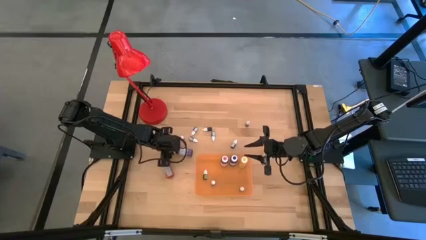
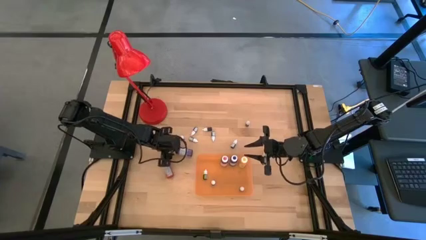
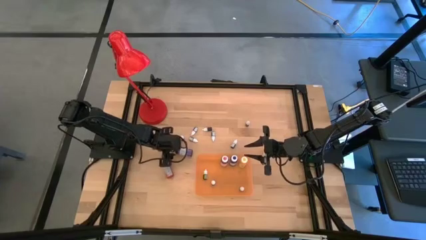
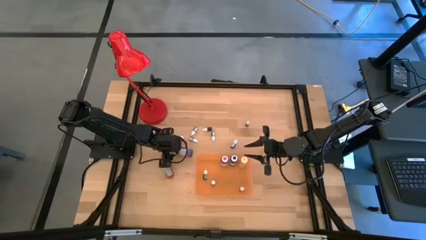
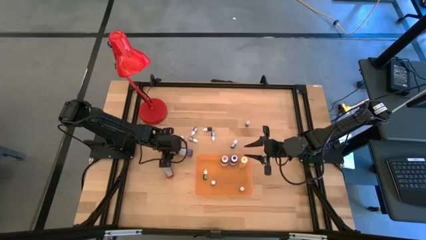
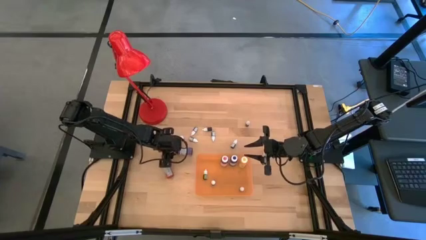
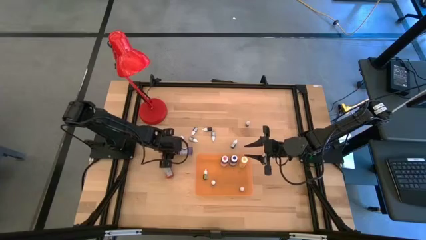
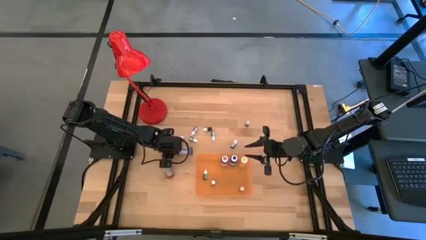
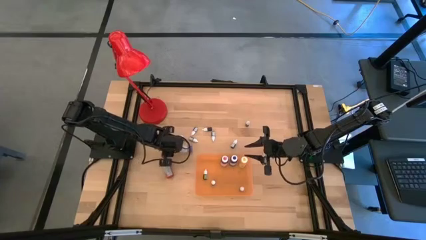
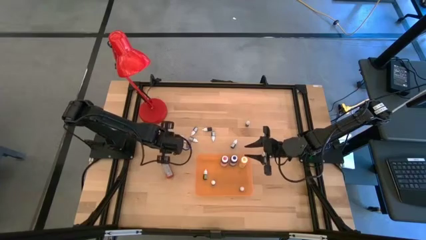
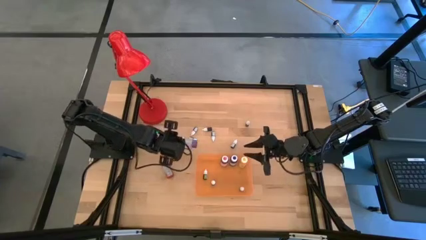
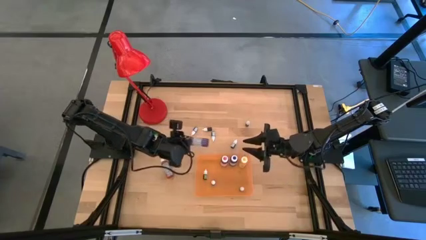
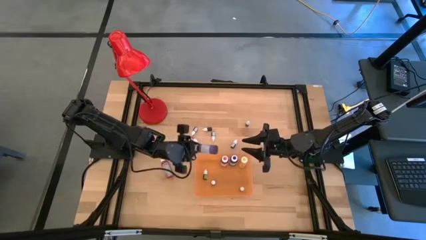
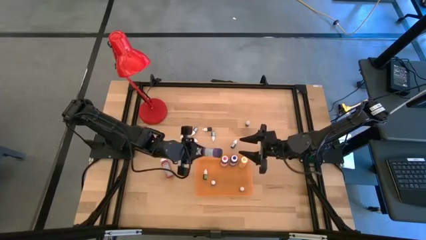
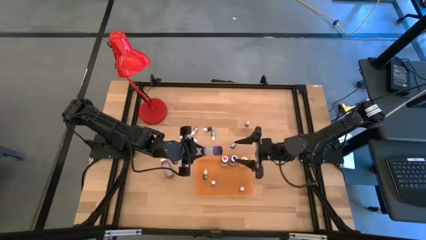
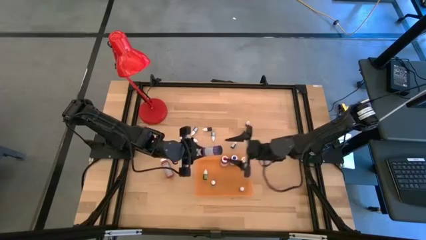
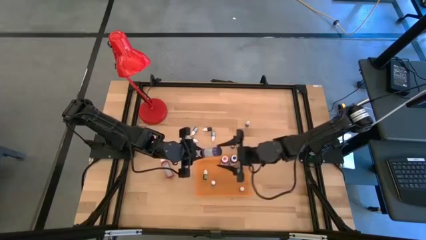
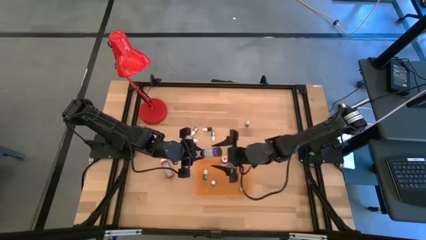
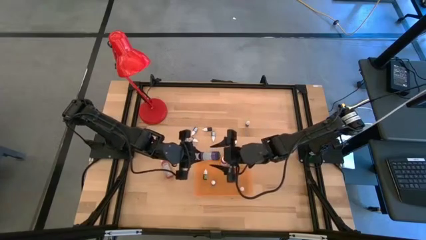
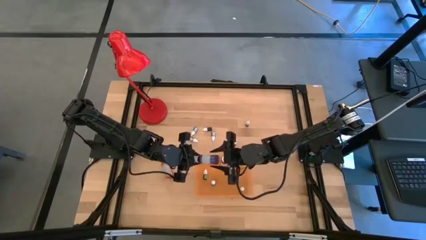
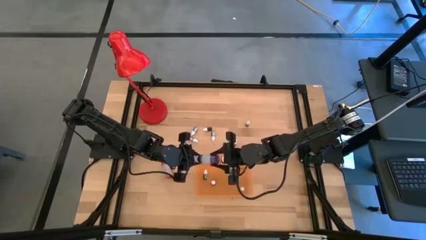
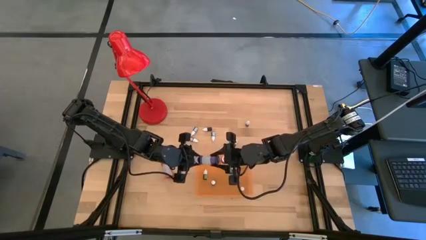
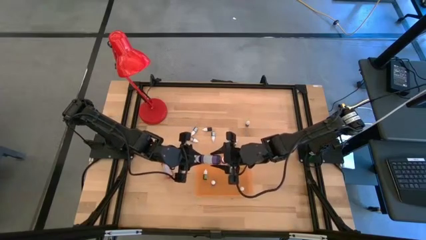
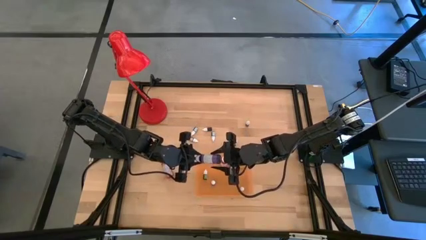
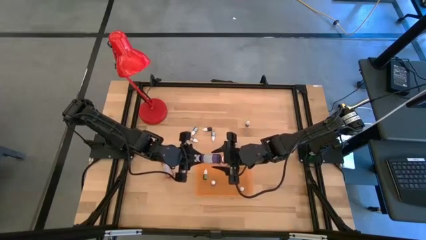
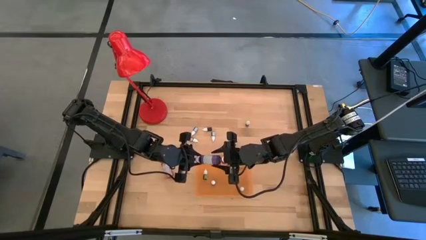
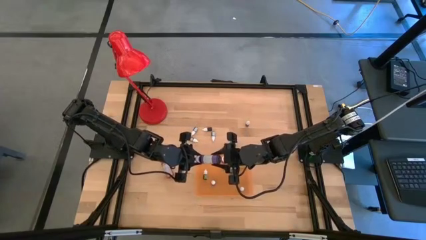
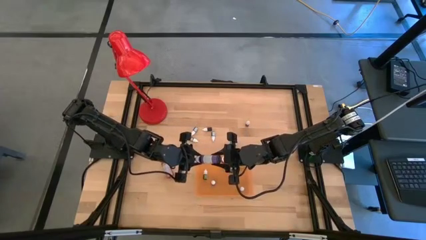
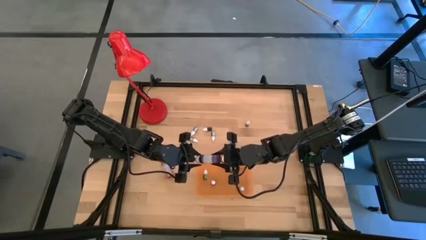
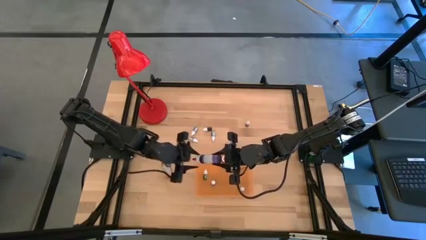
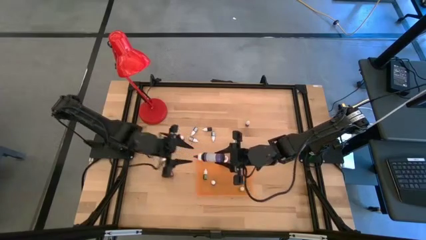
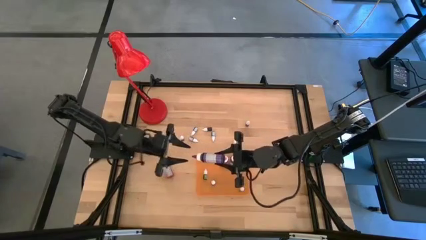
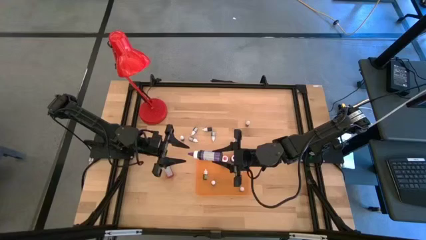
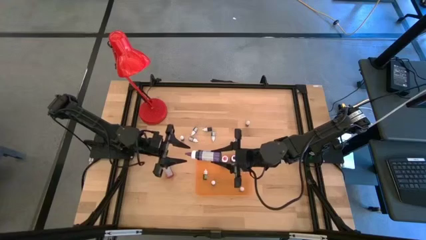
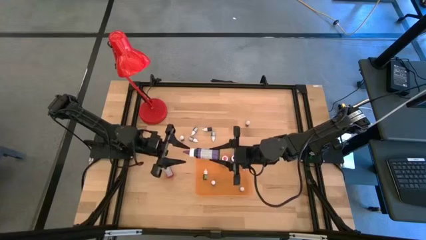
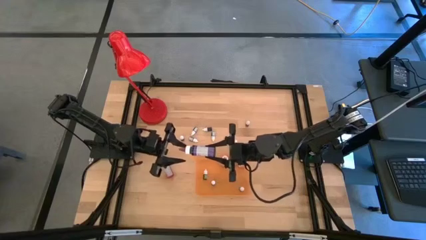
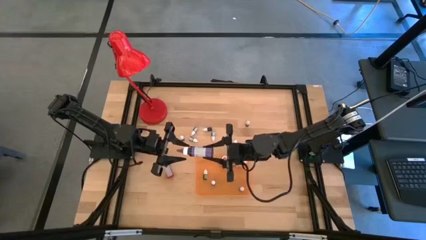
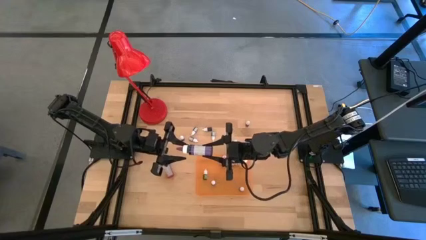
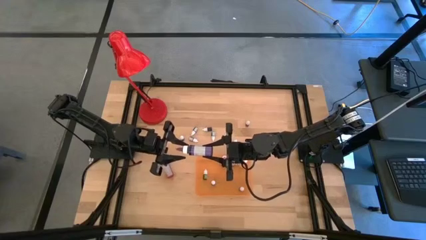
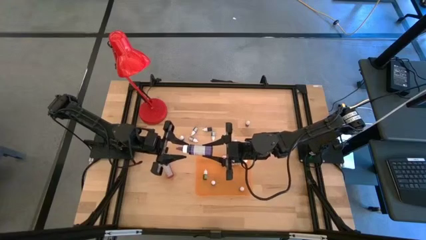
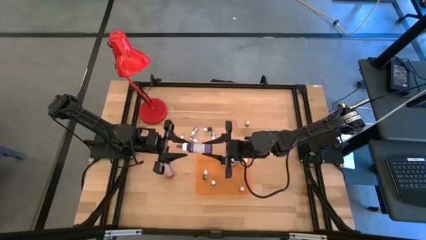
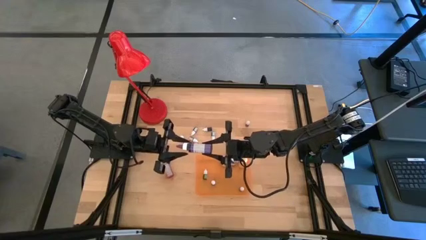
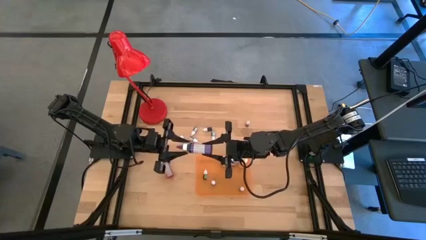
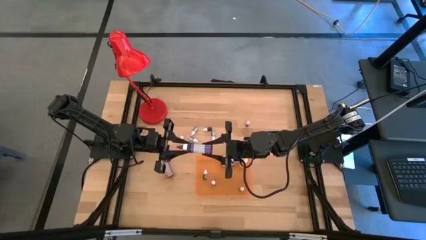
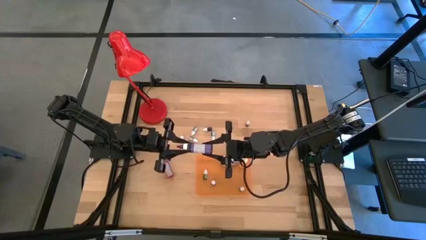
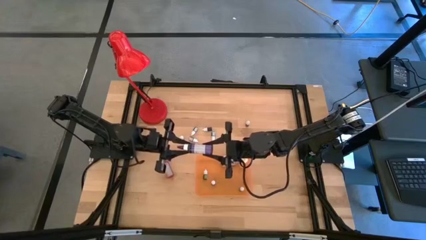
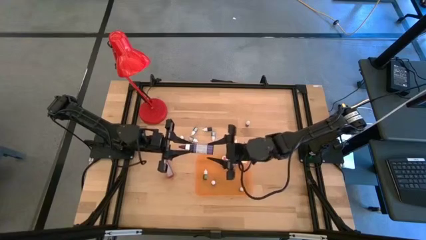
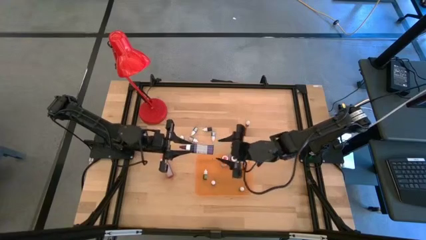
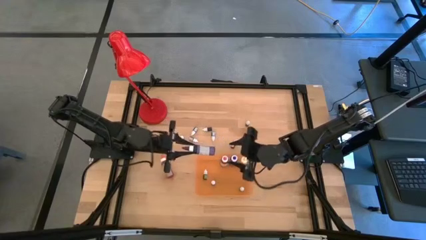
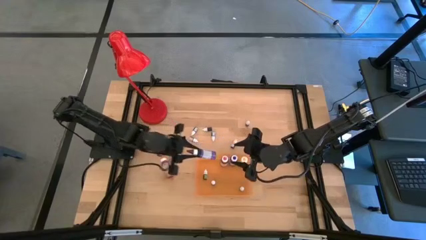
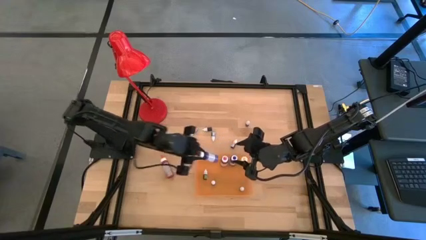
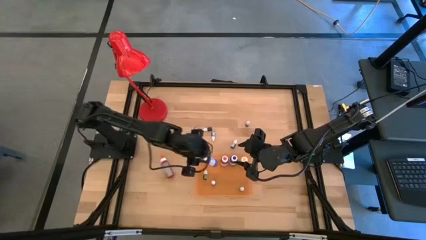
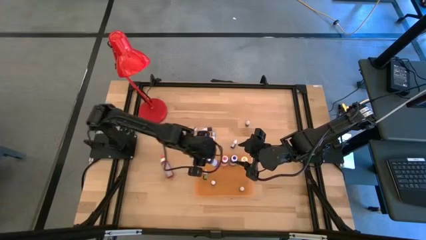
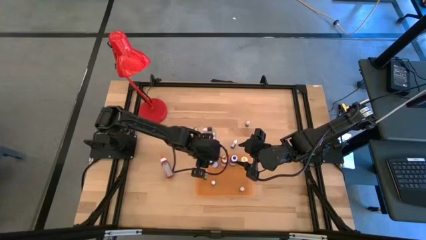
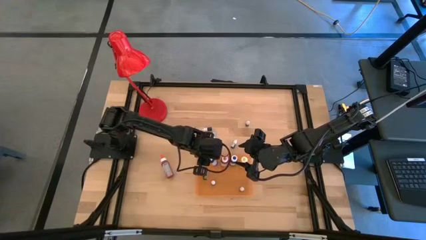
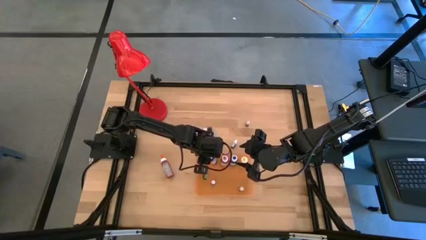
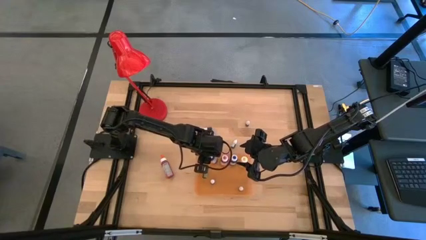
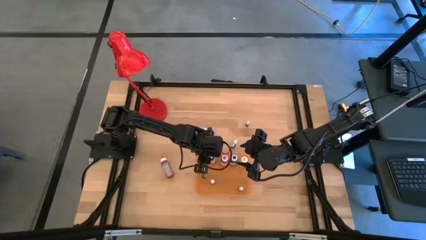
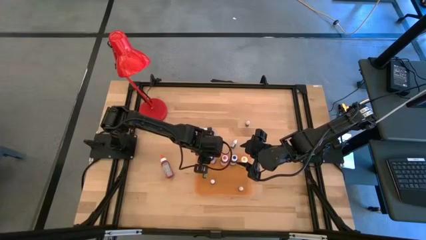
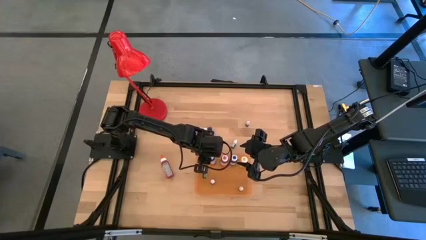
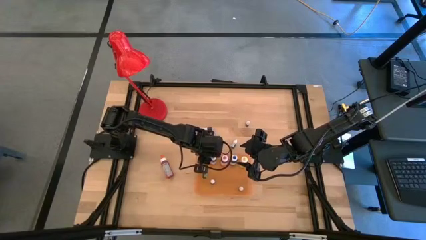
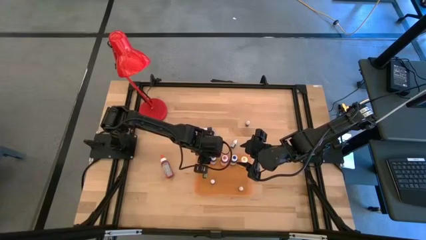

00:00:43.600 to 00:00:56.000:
Task: Pick & Place food coloring
Put the big purple food coloring bottle into the orange bin

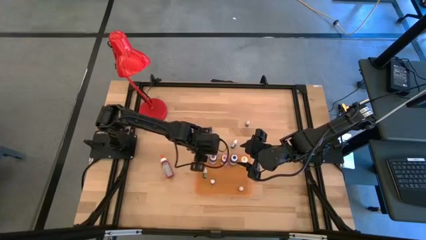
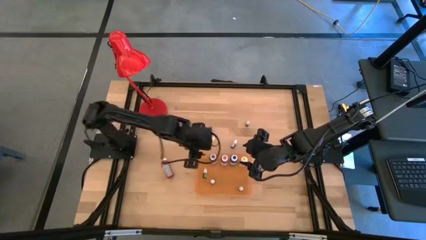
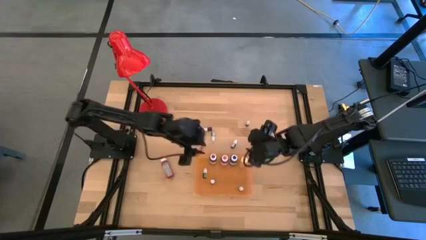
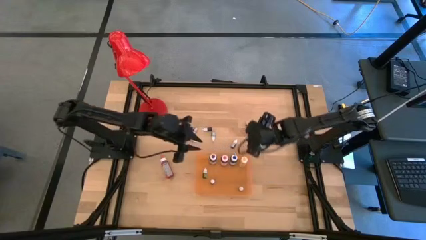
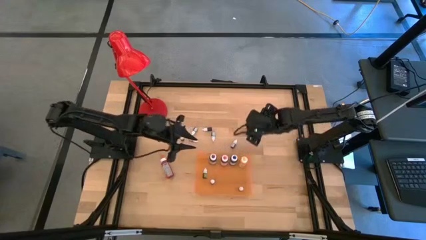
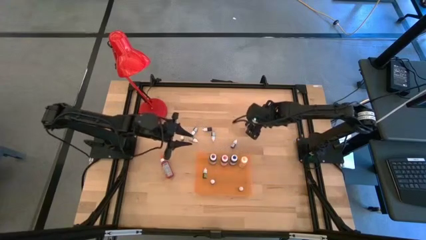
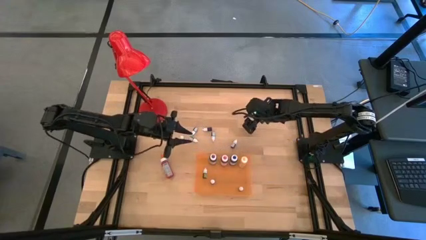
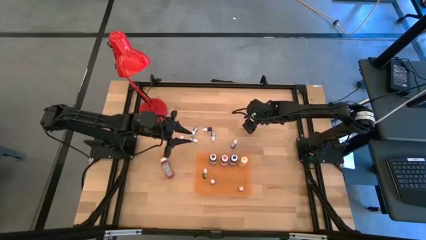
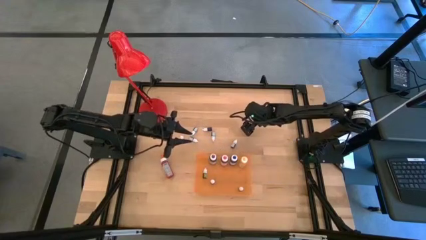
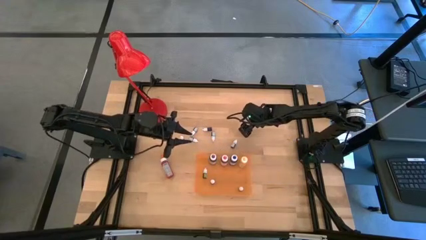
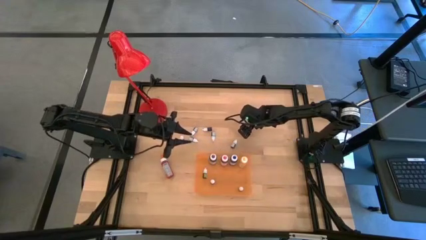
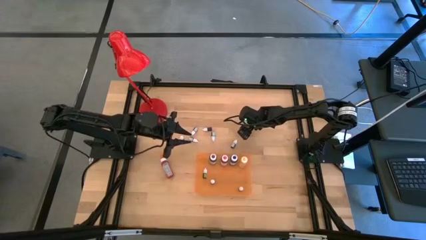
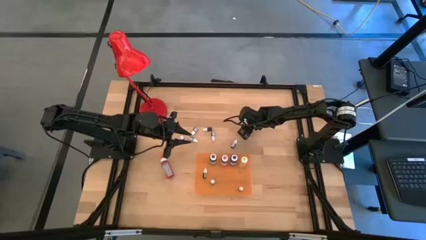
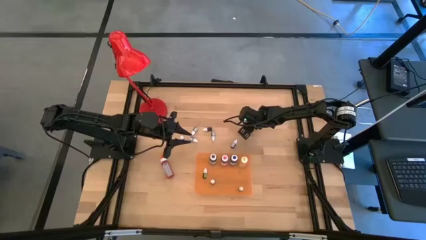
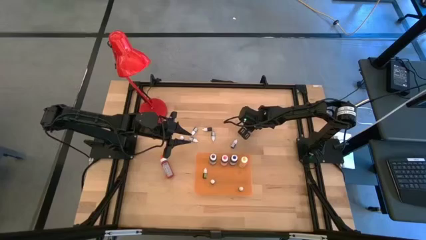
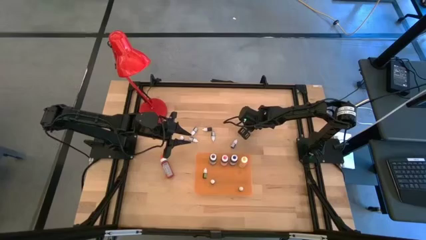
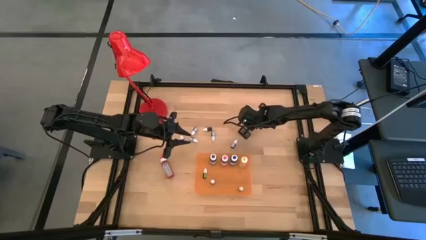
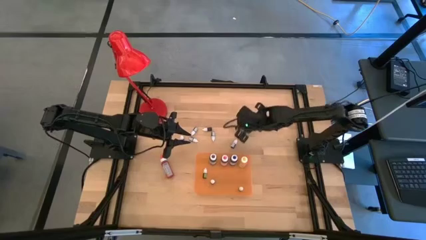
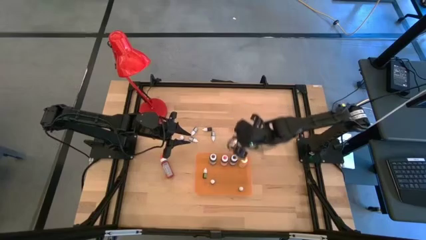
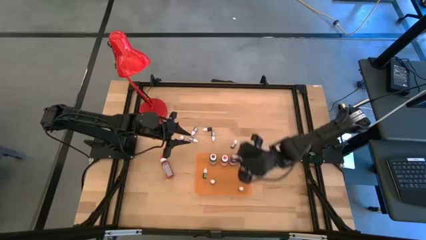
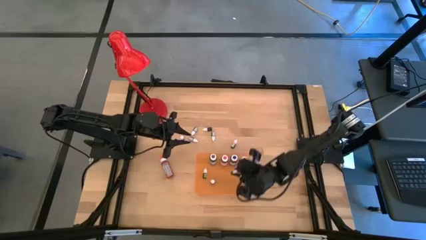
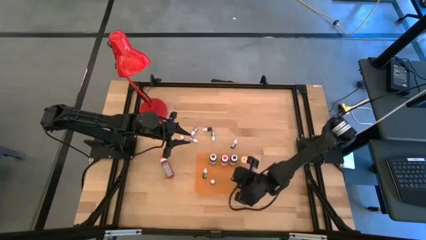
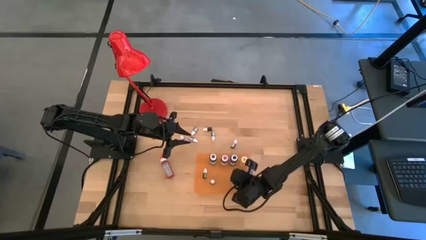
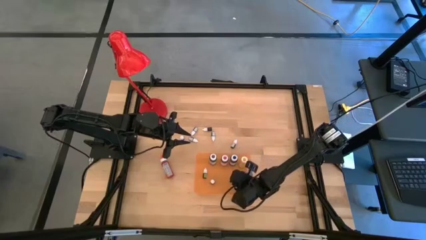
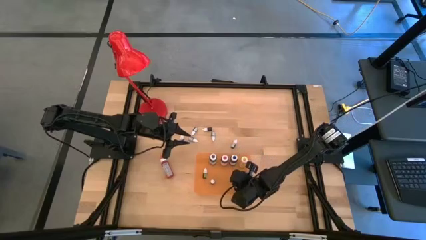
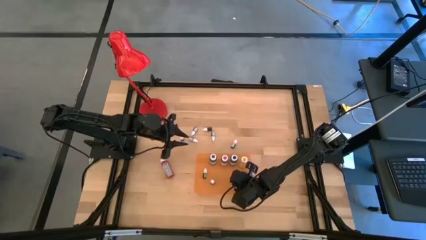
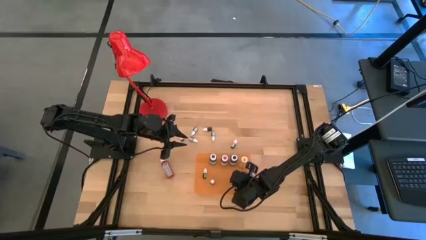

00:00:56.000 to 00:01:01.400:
Put the top small red food coloring bottle into the orange bin
